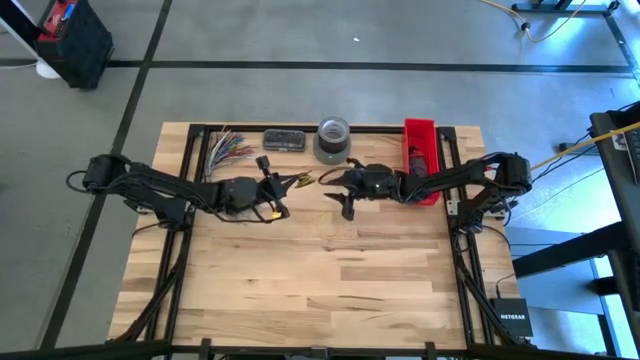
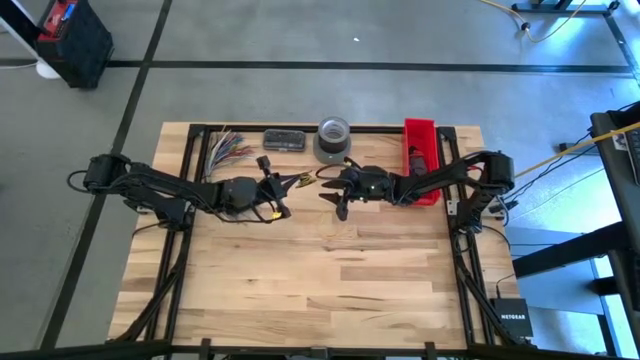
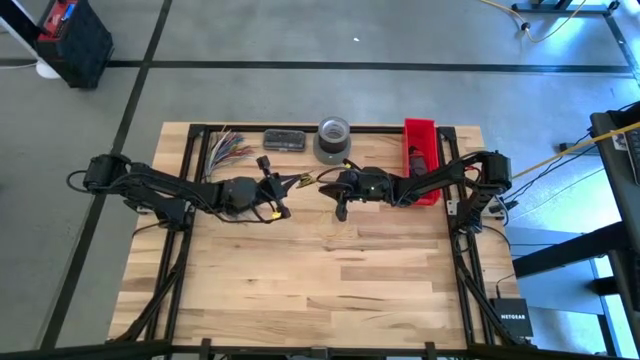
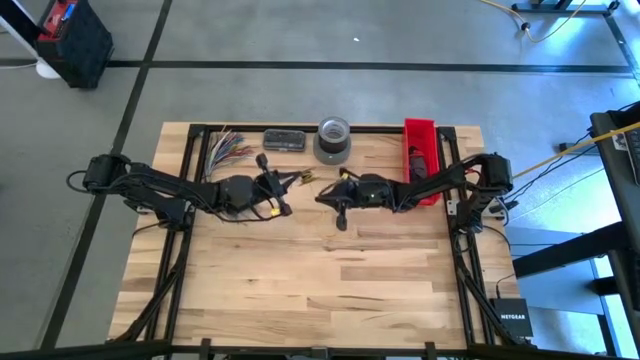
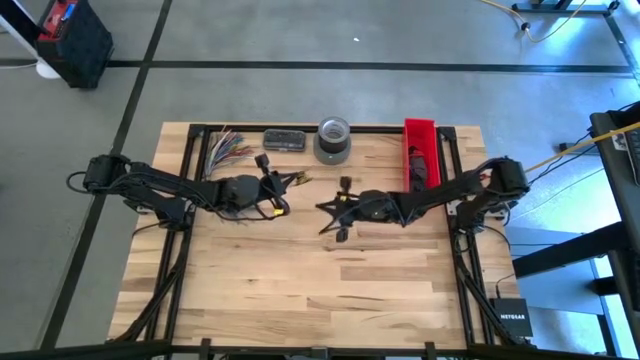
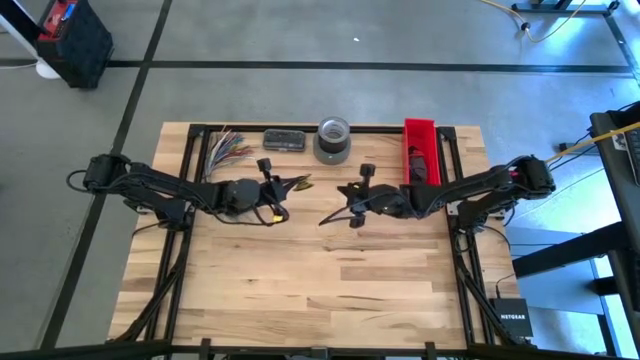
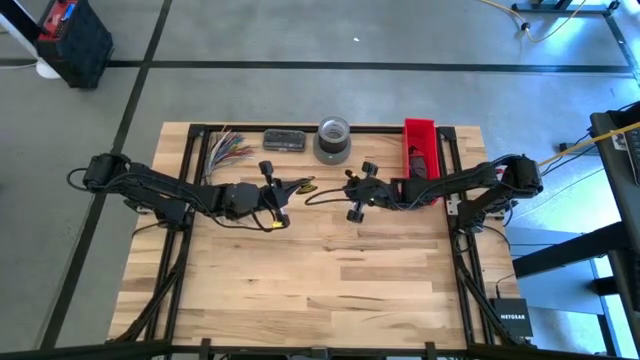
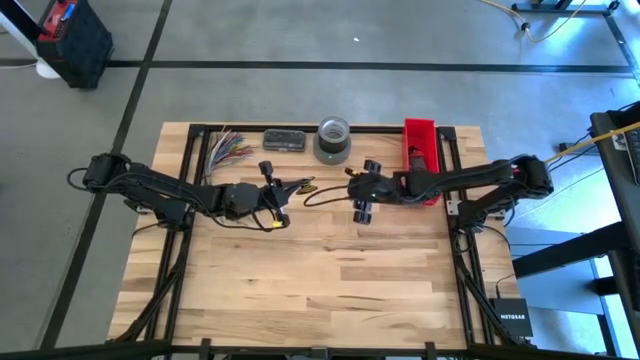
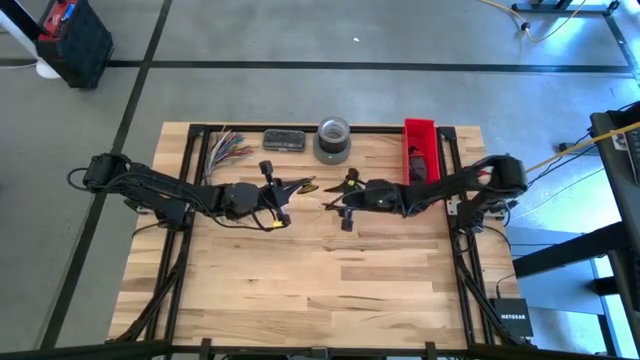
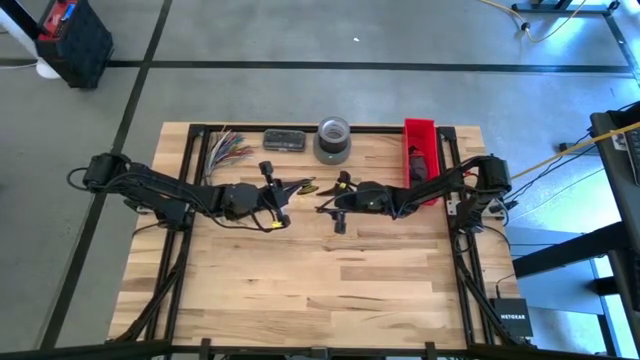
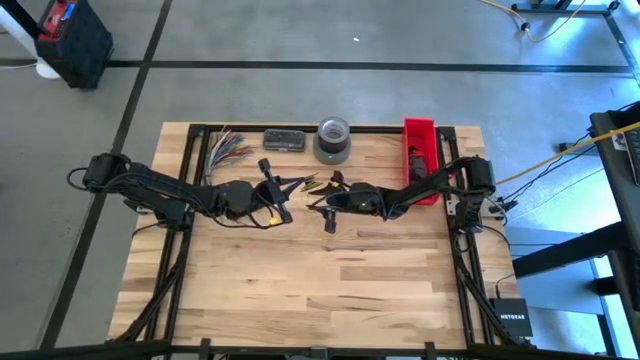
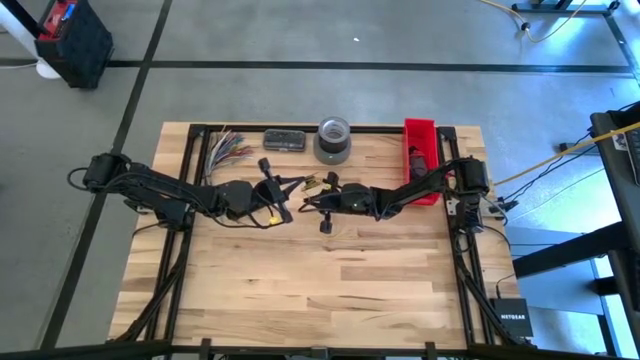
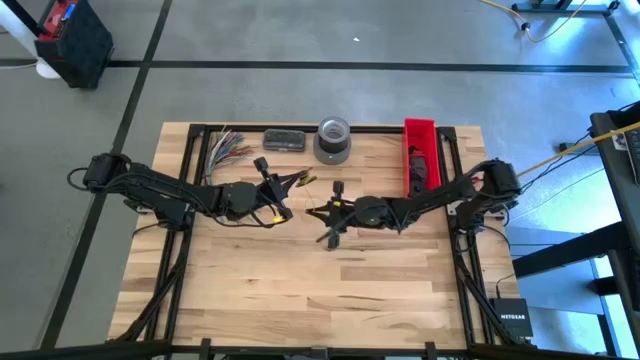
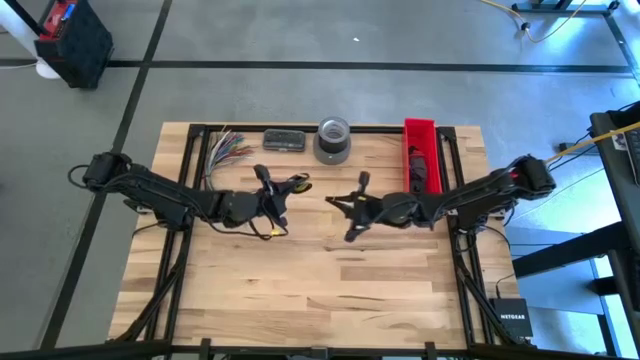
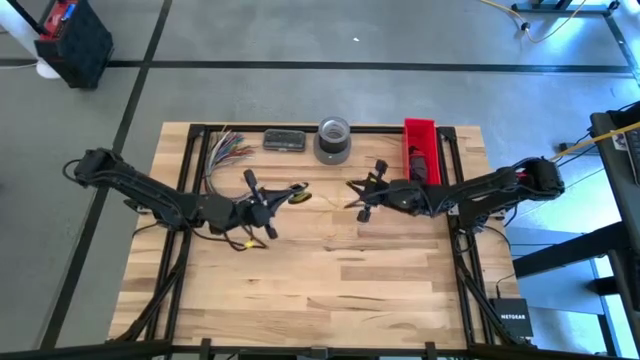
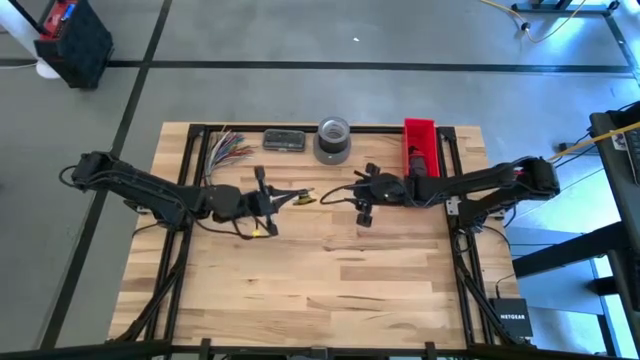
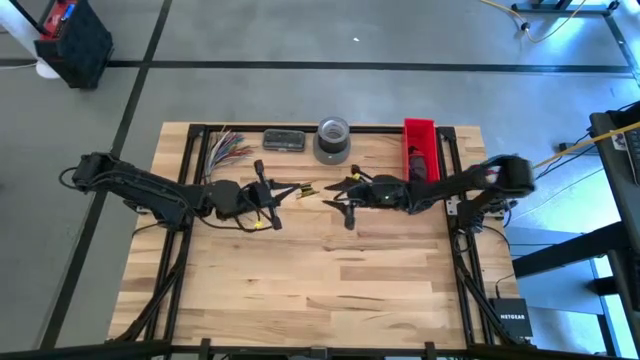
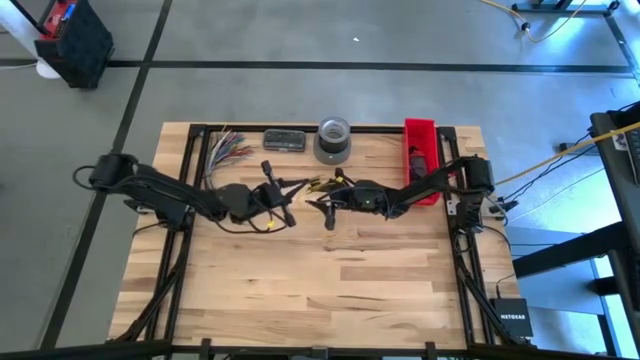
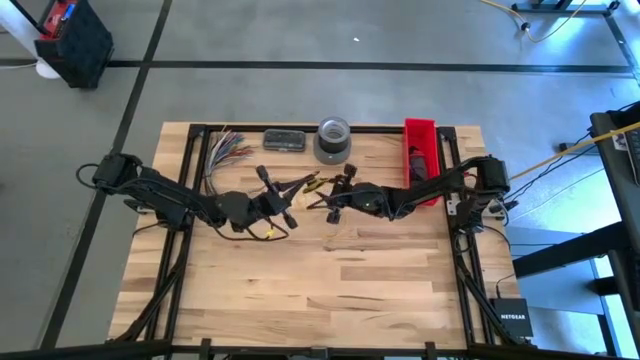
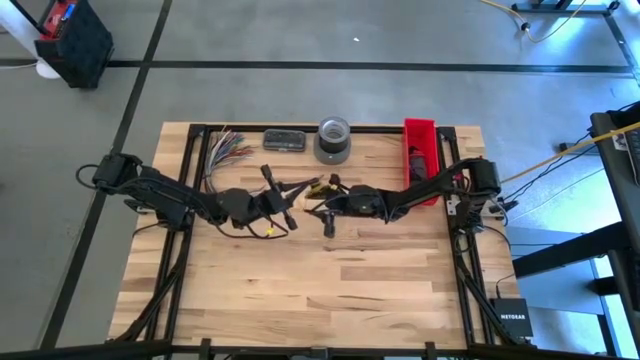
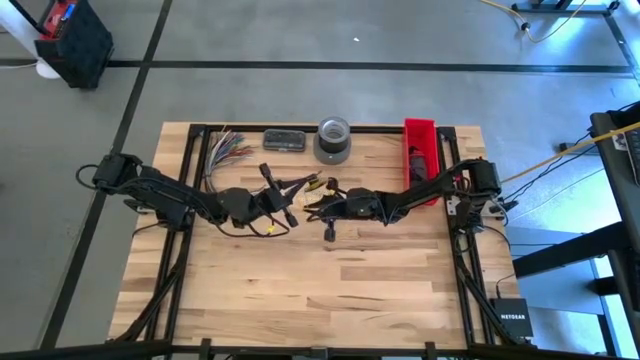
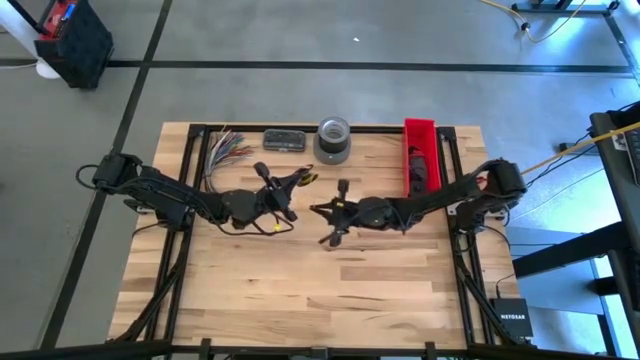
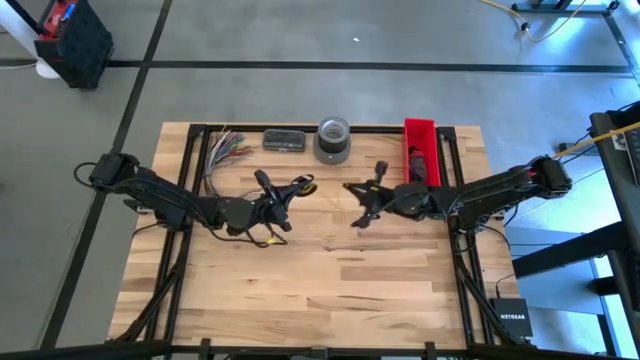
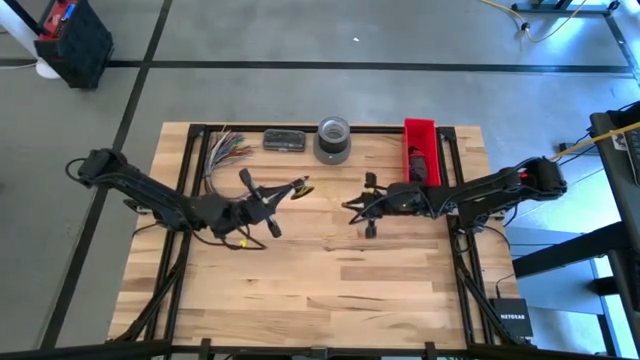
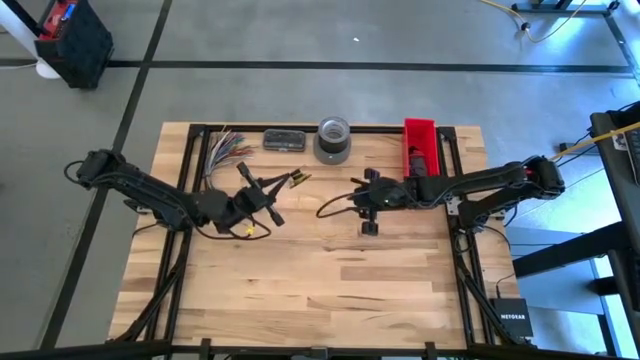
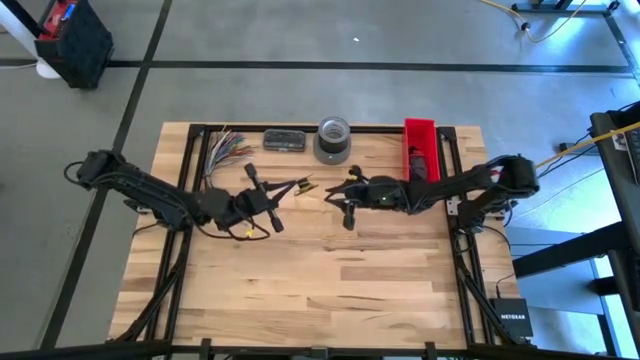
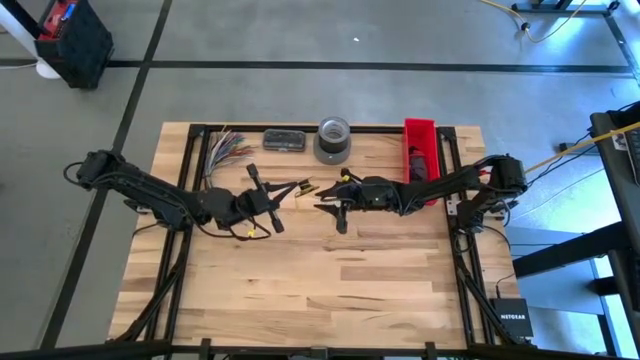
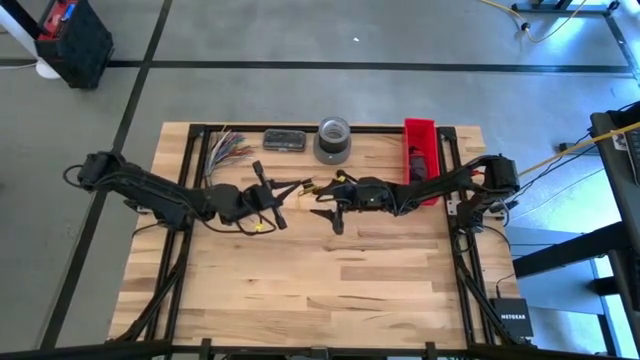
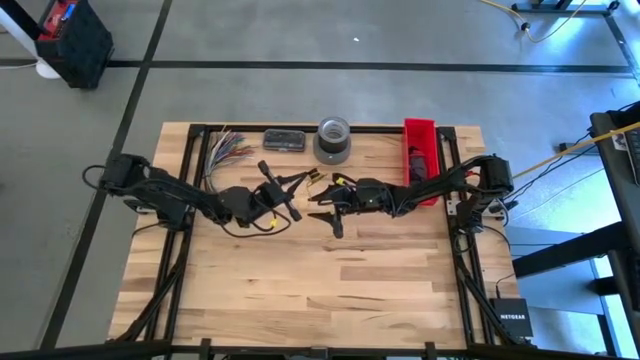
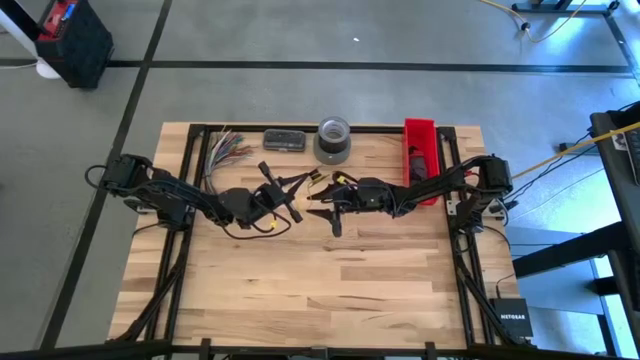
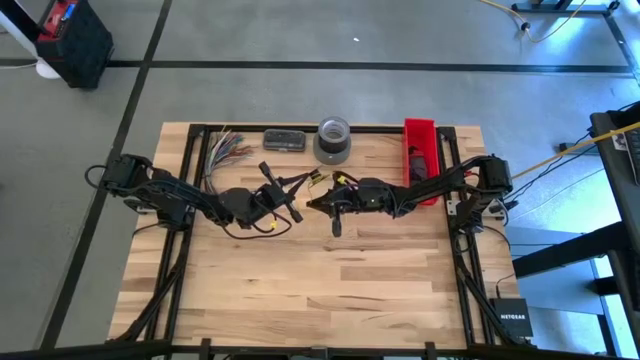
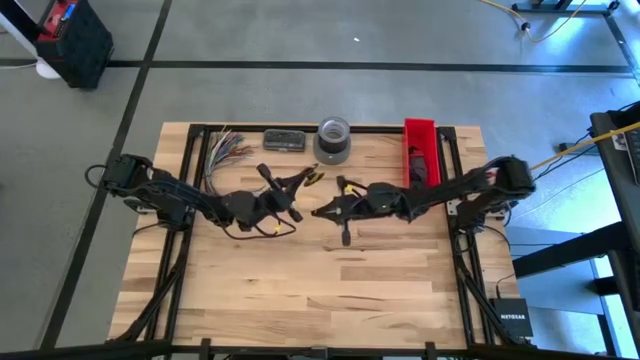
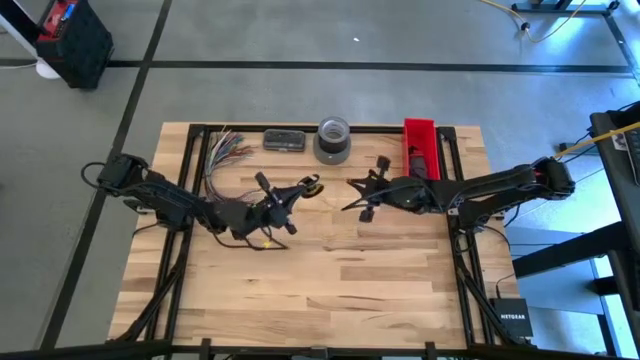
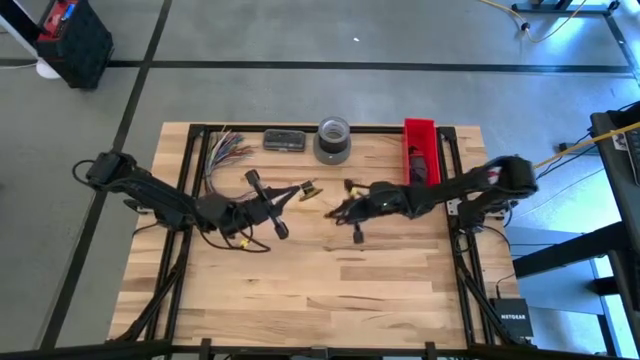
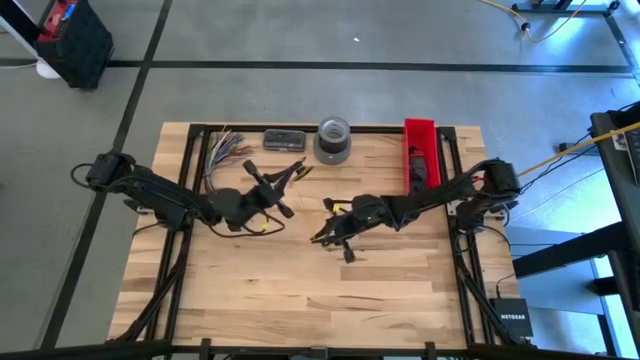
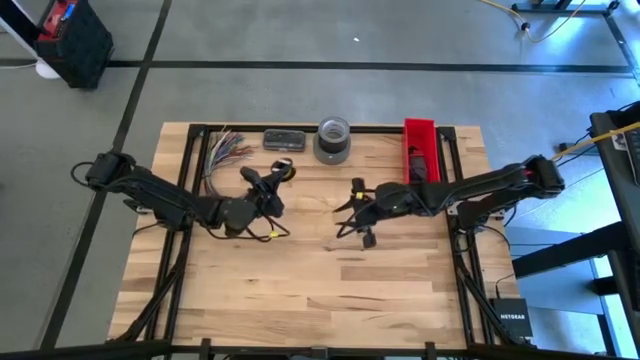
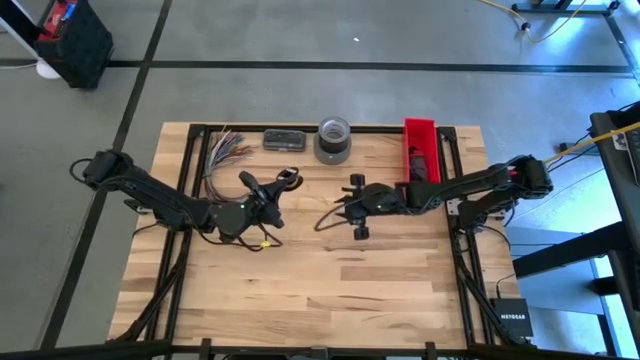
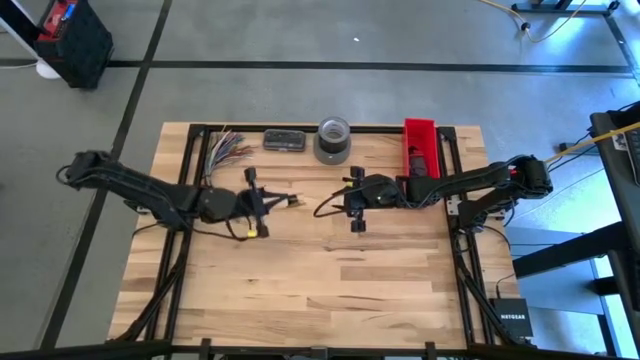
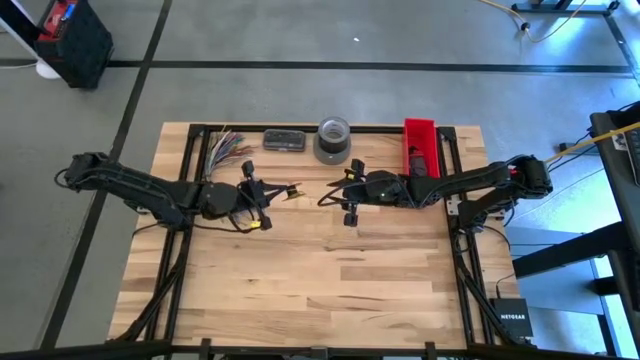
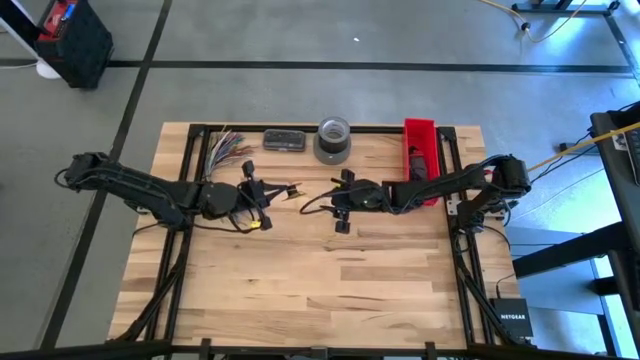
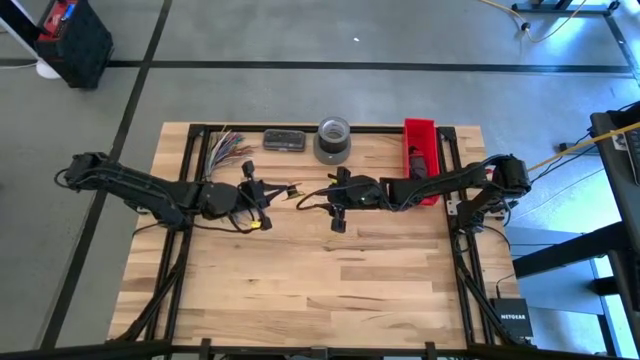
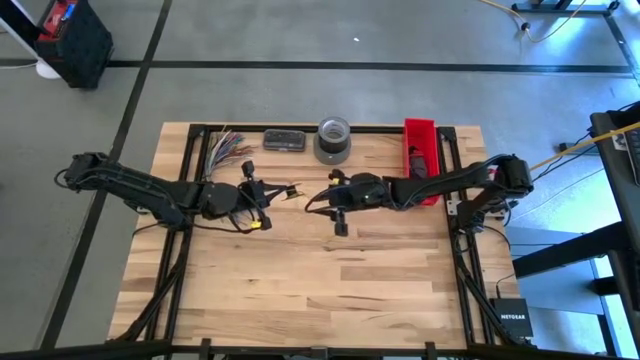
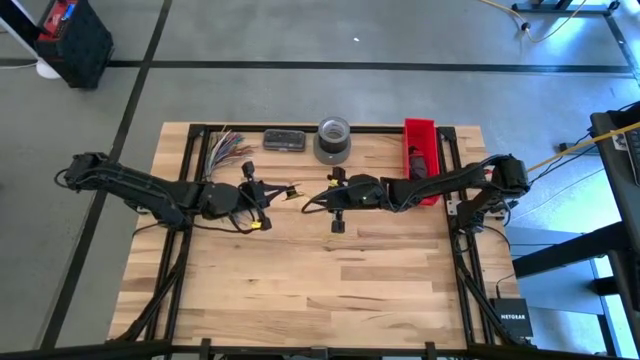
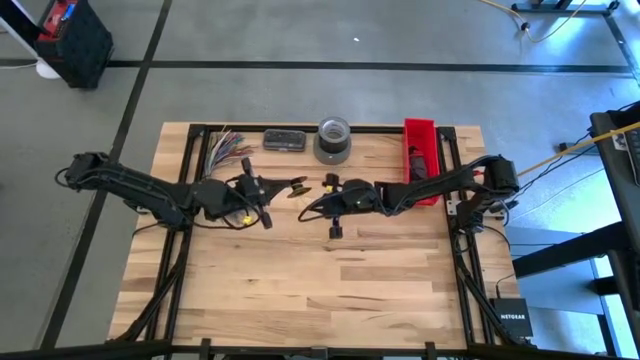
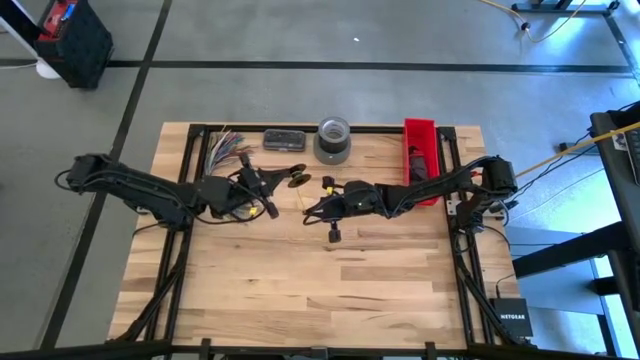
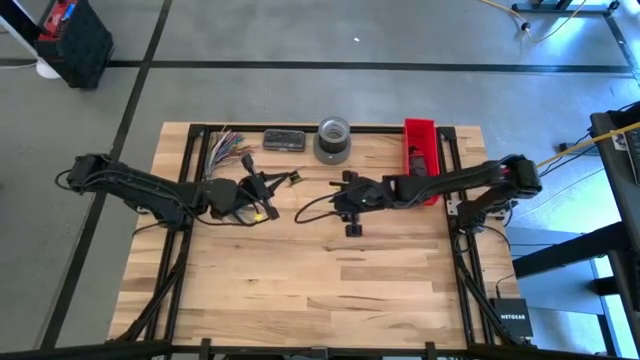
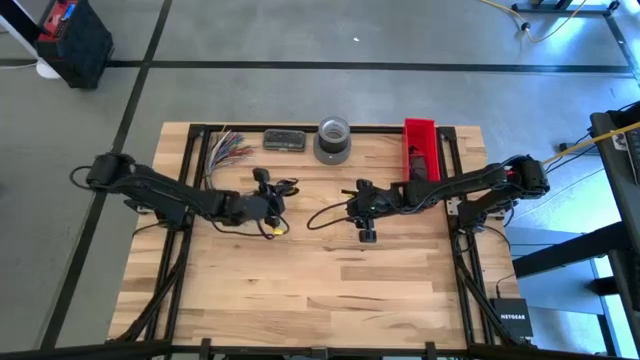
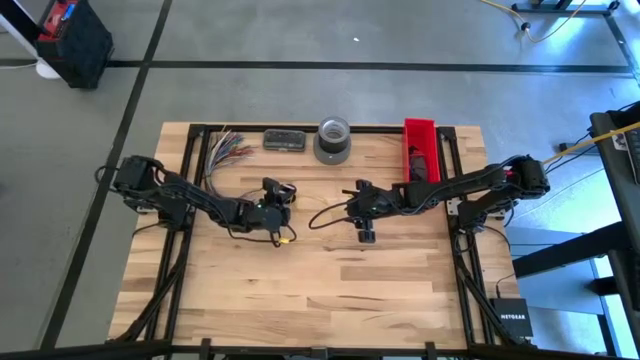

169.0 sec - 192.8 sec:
Task: Coil cords
Uncoil the yellow wire from the black spool
